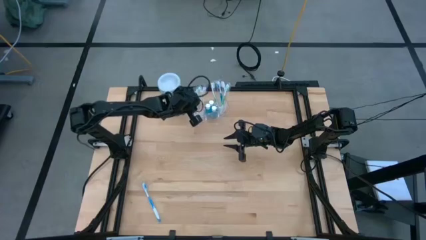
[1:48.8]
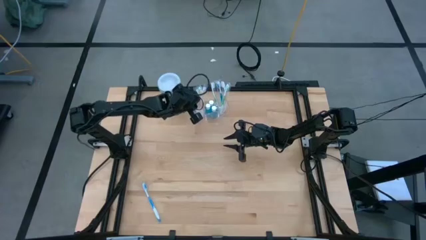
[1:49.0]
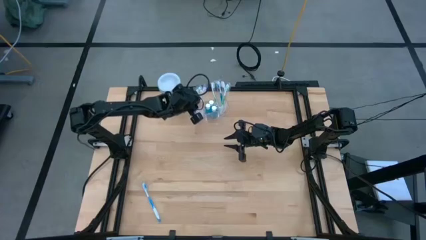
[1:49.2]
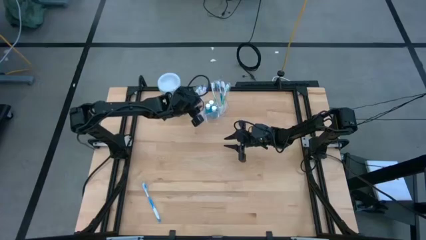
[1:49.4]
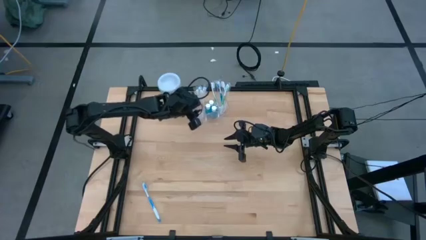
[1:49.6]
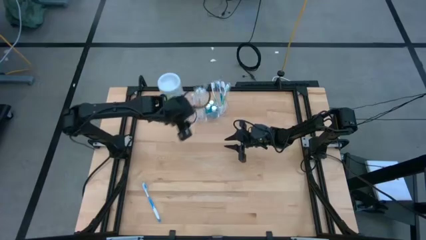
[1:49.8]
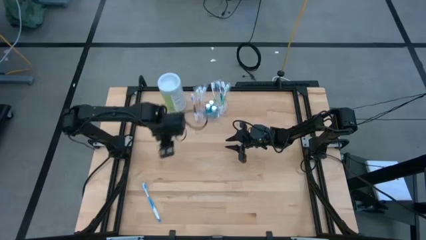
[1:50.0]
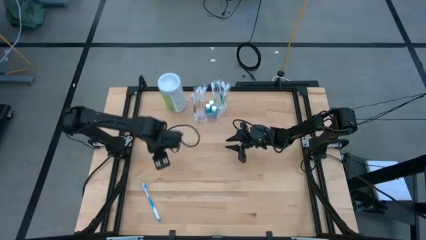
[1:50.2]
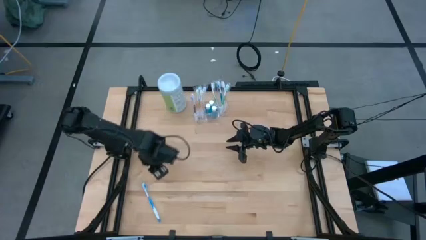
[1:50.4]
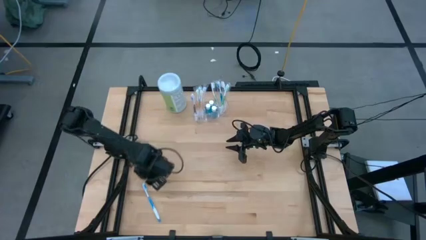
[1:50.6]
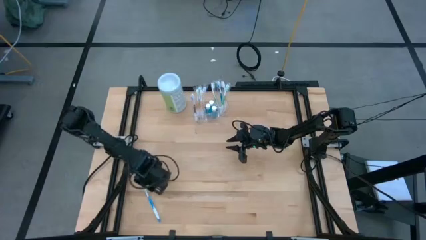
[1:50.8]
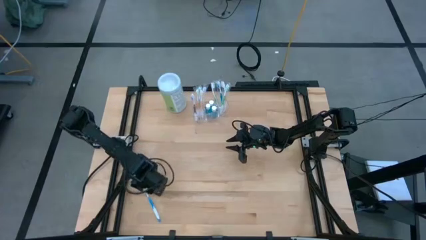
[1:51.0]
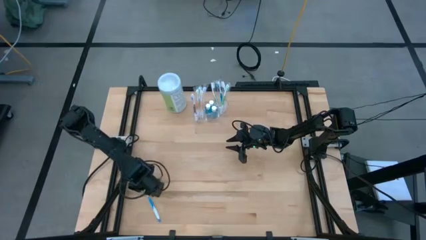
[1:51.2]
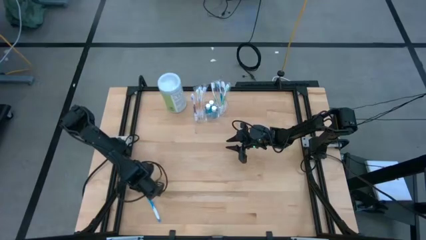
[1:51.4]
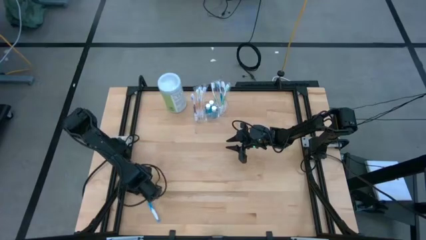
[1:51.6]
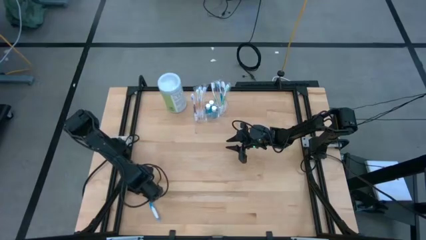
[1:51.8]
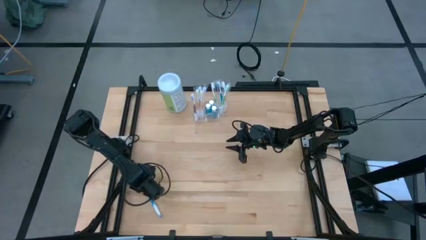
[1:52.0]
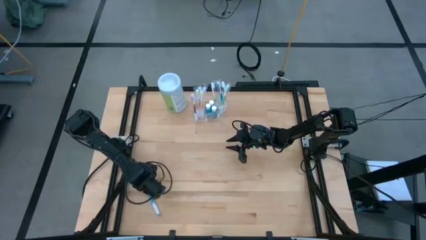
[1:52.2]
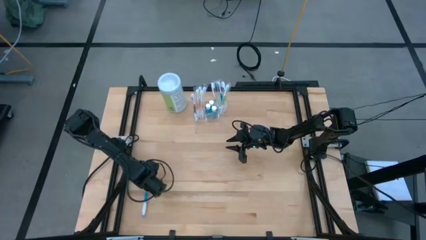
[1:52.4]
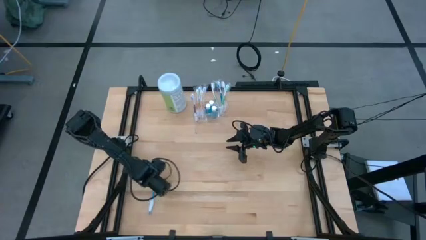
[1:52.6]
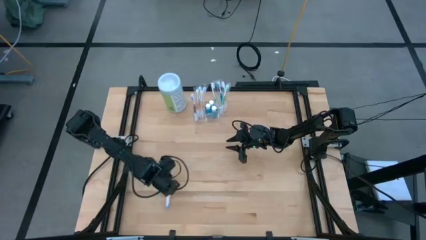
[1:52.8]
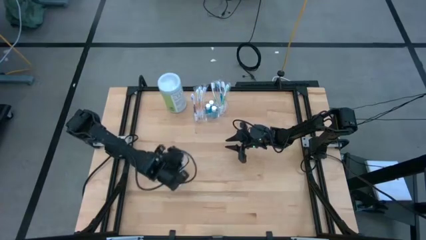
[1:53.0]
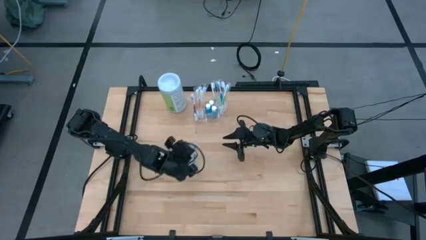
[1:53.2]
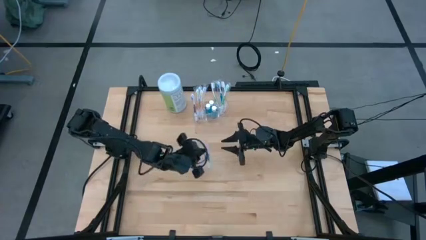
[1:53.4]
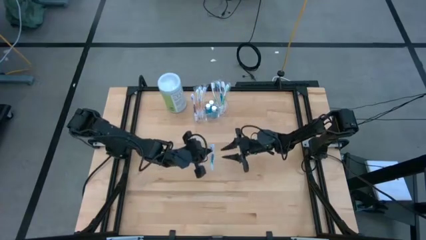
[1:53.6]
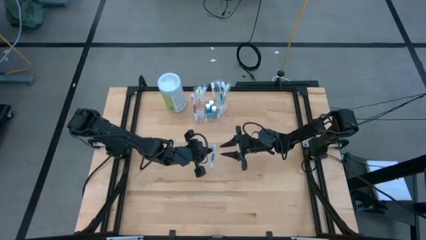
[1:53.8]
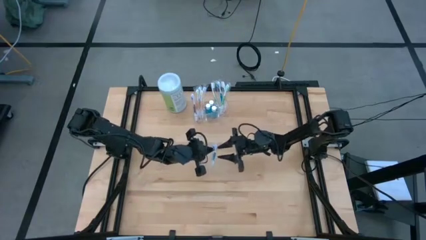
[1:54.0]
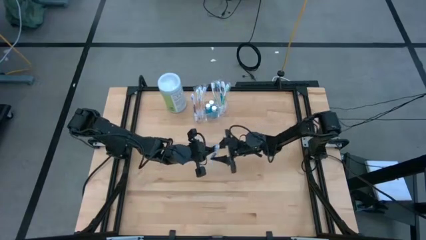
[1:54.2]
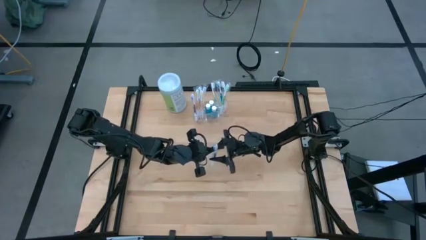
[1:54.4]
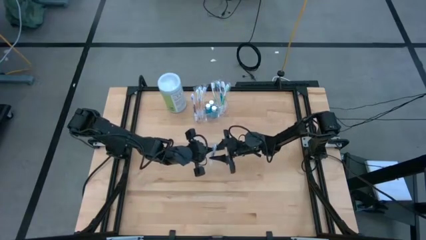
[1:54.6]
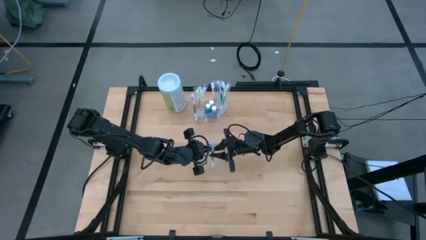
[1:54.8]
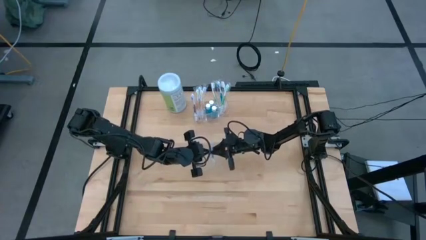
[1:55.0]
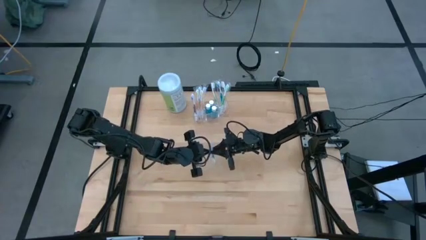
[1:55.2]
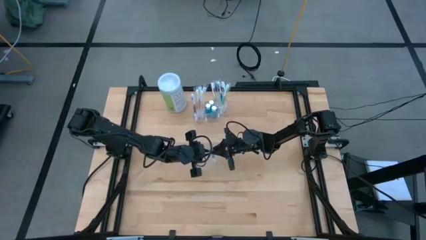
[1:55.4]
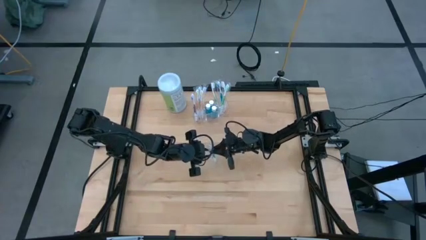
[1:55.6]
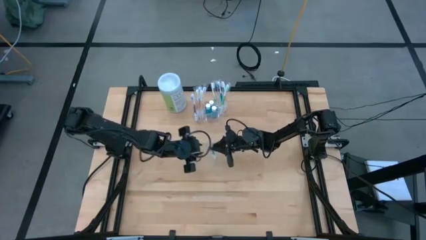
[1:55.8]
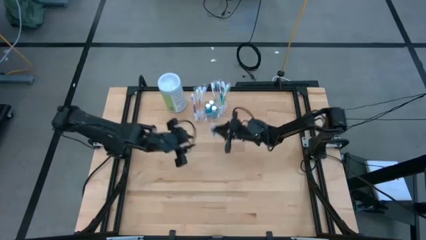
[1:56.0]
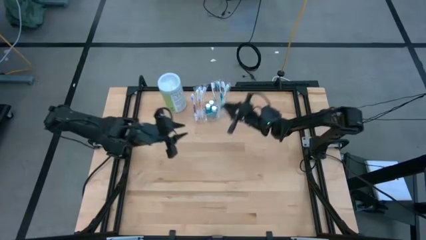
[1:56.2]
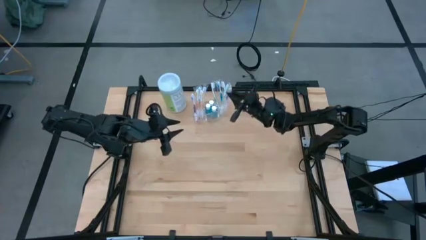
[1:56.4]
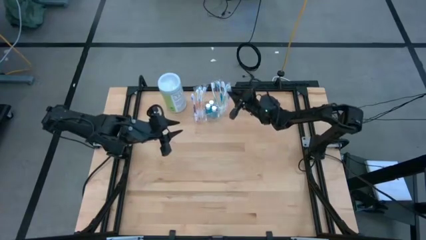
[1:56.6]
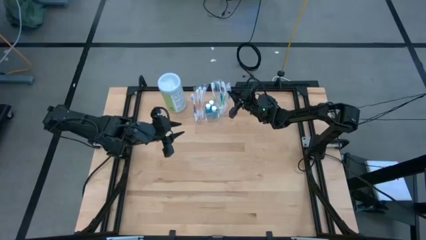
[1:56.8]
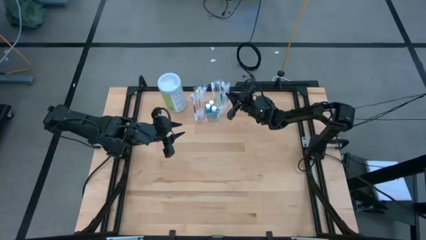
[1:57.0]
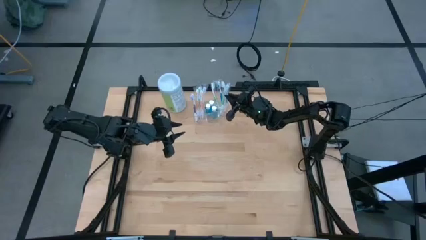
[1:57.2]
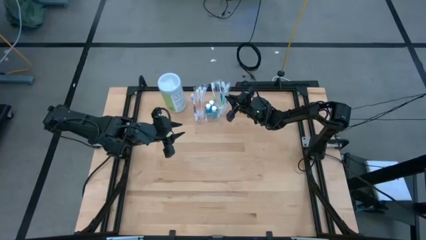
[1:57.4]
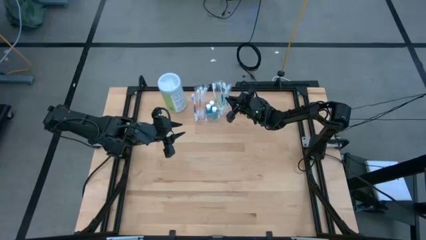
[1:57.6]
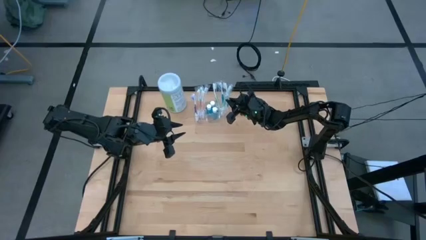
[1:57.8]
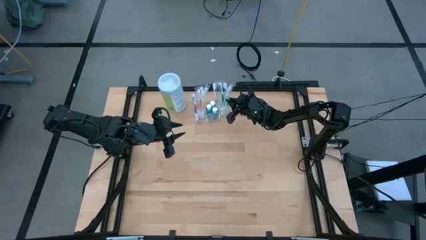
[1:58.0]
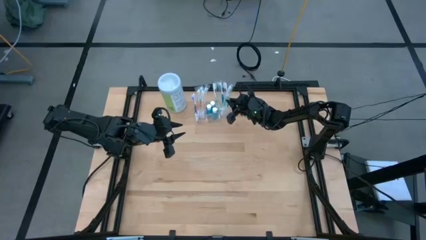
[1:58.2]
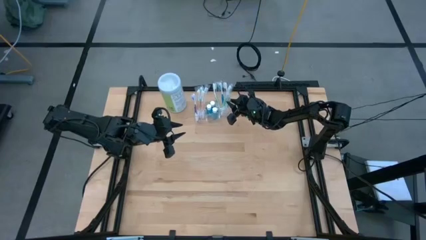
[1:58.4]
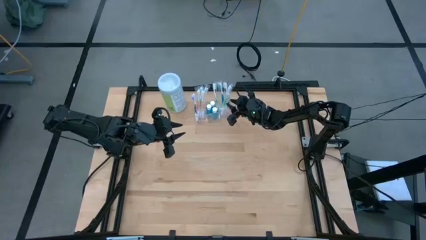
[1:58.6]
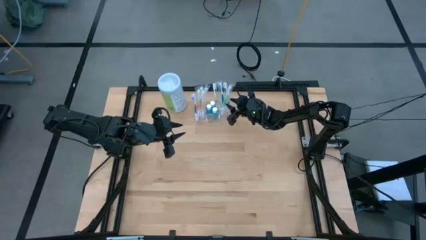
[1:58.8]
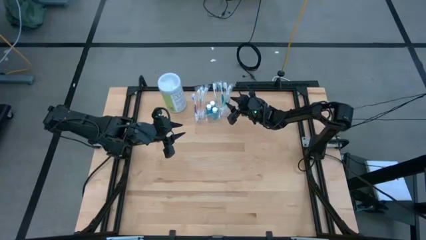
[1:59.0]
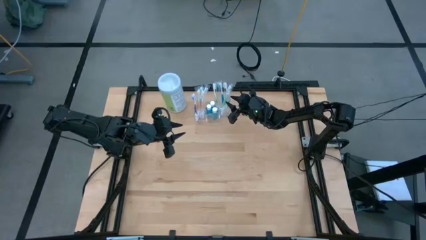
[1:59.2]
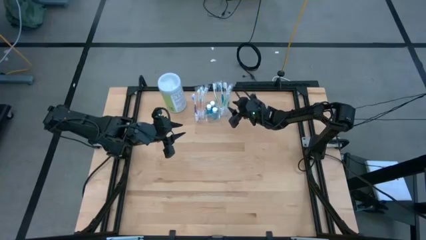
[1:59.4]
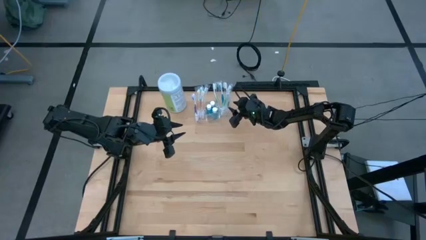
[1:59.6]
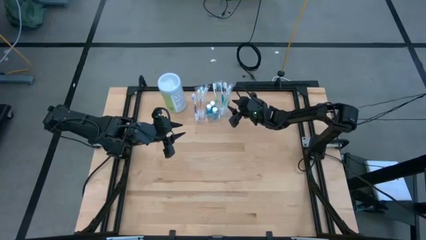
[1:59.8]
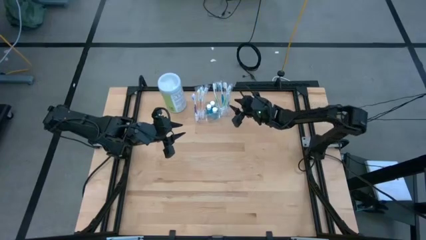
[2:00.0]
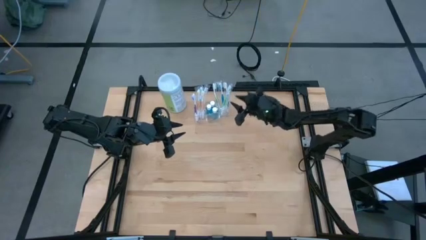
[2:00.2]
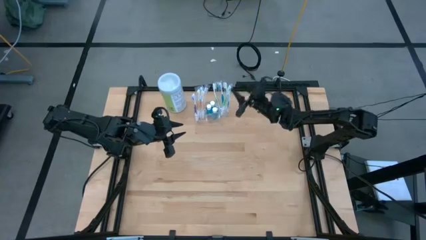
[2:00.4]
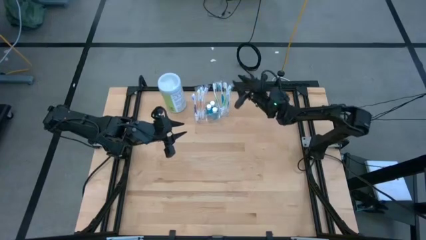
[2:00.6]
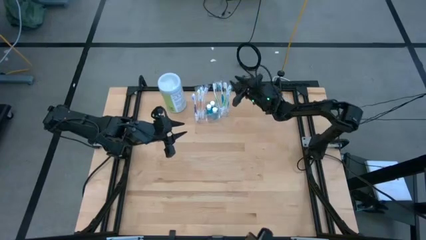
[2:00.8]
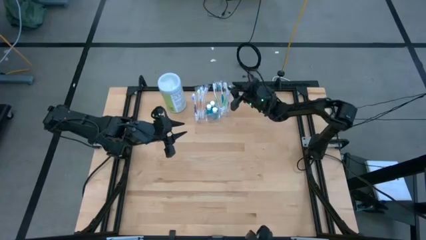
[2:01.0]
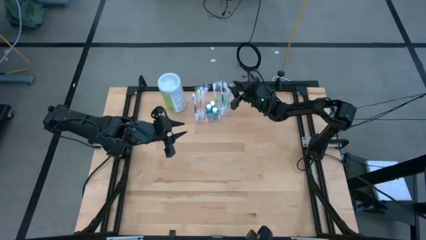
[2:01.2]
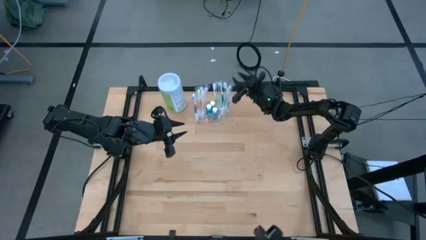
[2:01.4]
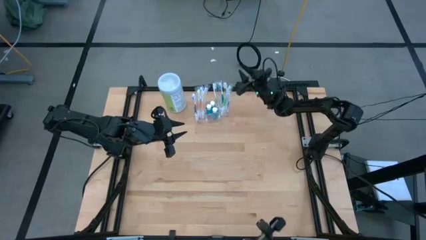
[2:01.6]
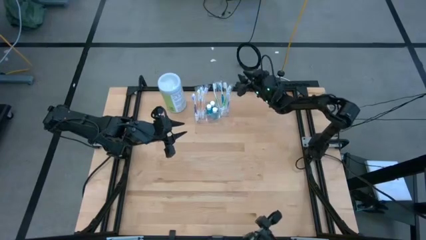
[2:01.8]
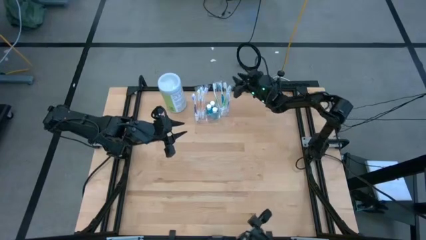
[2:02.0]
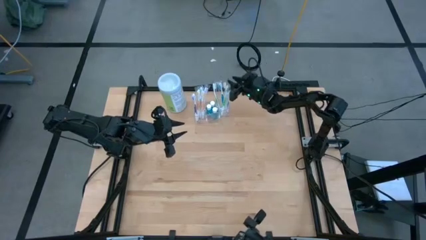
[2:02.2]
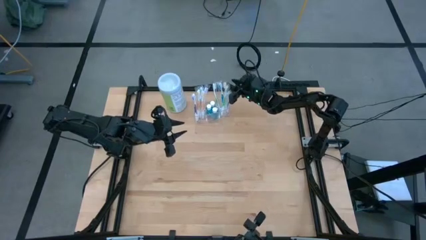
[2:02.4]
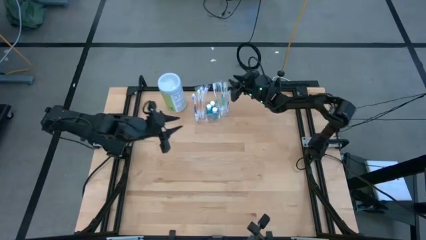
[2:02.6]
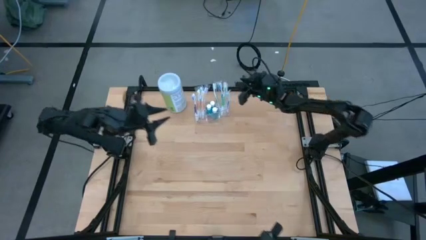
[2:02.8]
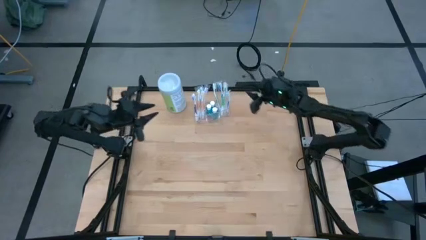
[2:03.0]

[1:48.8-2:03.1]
Task: Pick & Place toothbrushing station
Put the blue toothbrush into the transparent organizer

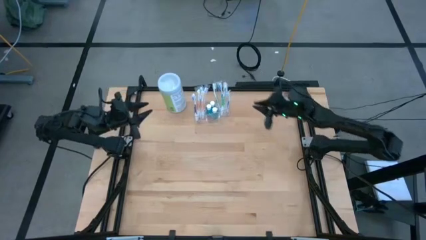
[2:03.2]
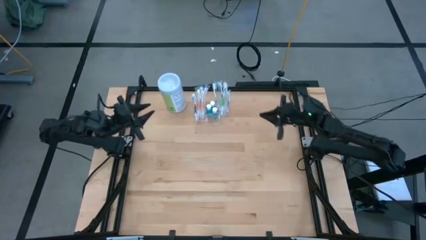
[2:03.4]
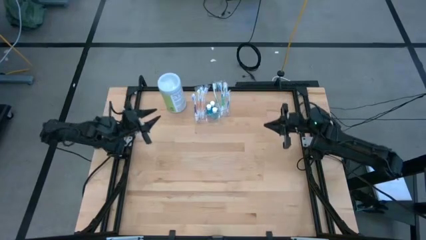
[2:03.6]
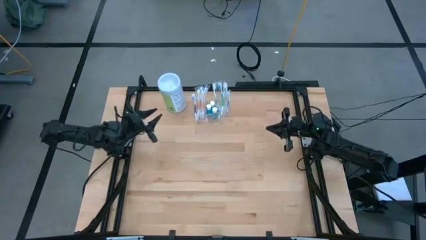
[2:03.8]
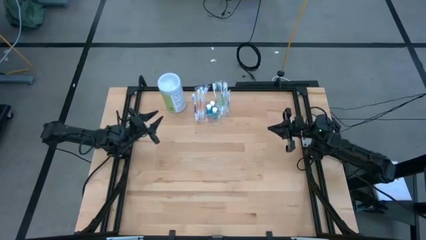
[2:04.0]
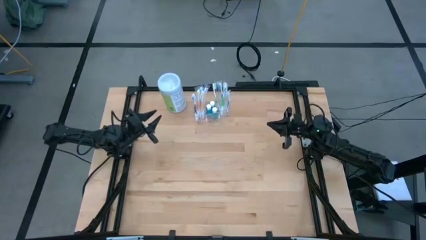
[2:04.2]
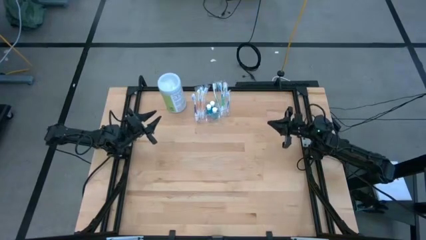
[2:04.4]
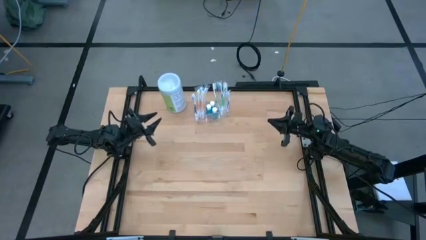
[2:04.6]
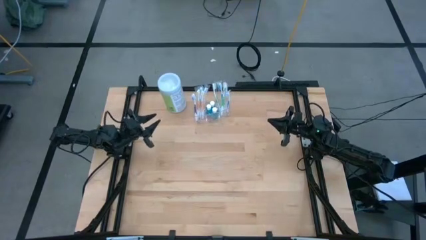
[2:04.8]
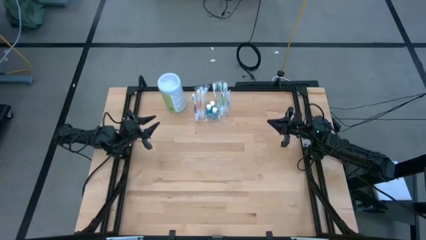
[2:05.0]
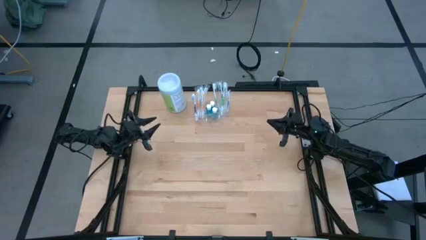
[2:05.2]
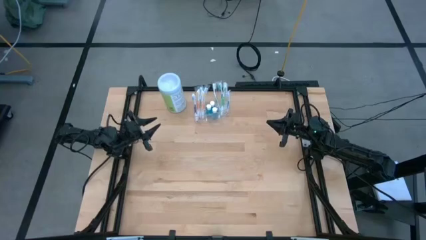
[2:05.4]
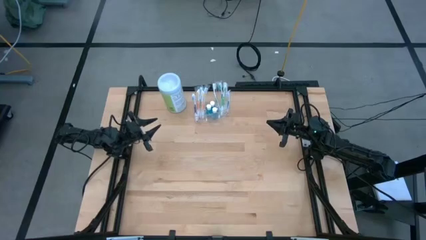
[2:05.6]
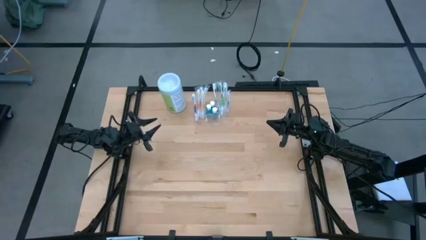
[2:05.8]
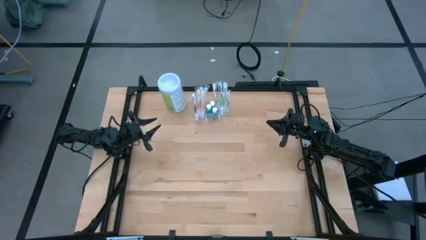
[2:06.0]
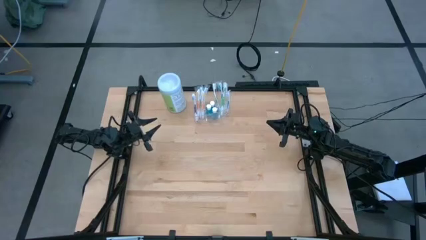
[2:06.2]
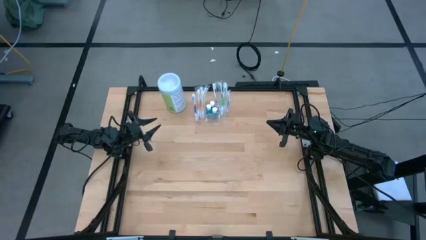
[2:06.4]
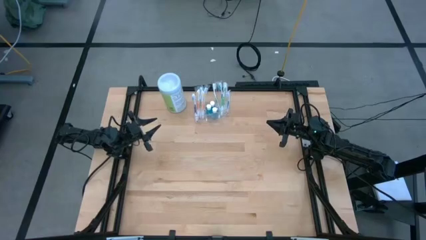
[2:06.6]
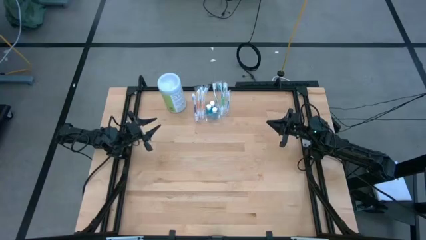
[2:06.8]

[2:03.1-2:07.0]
Return to Home Position
